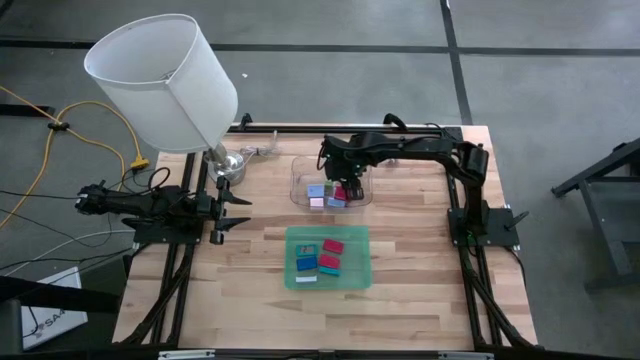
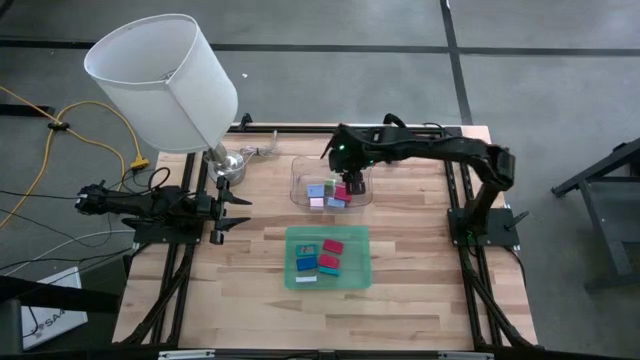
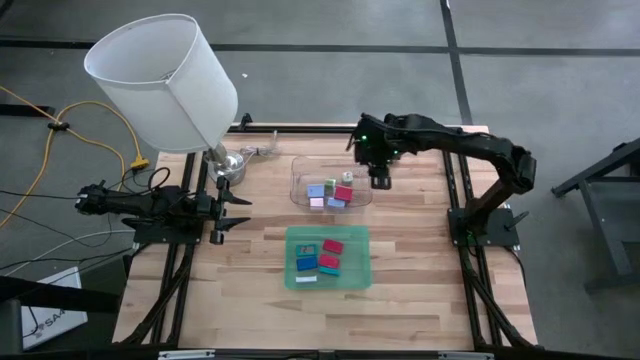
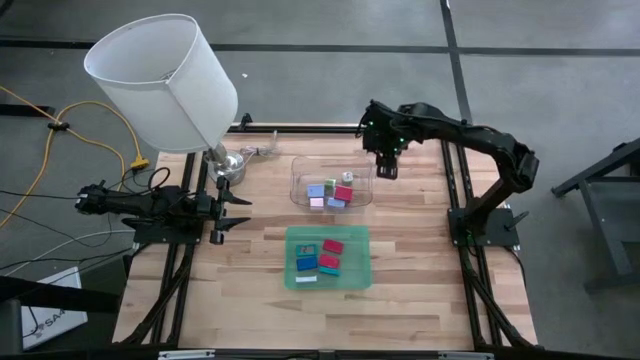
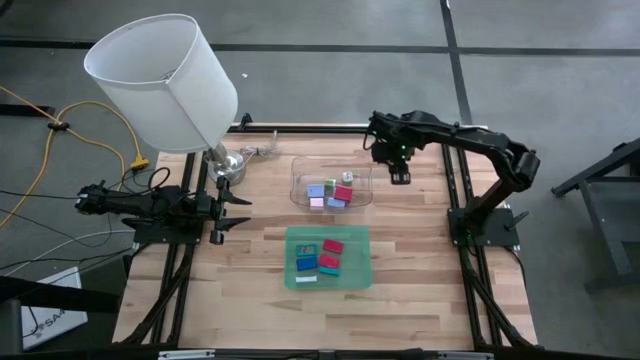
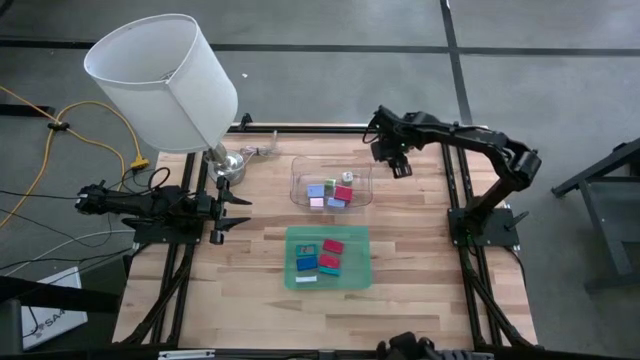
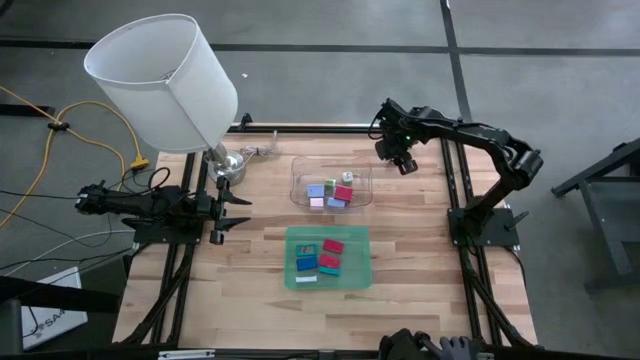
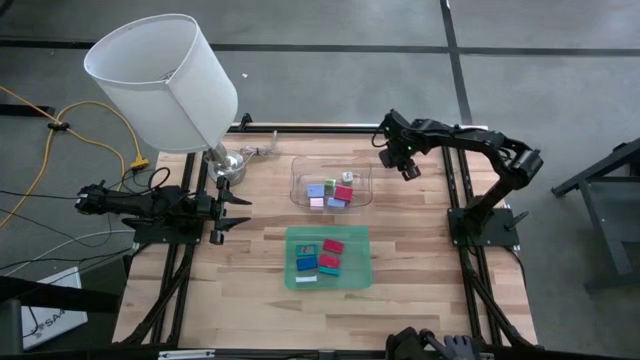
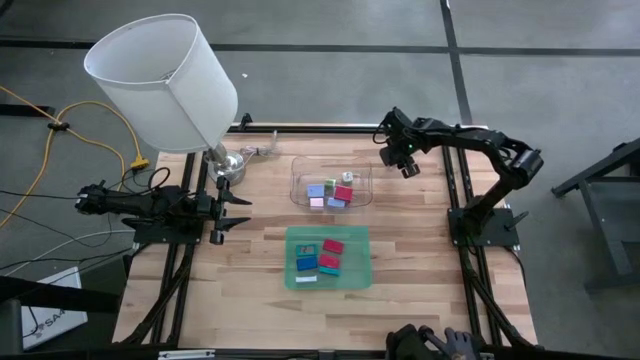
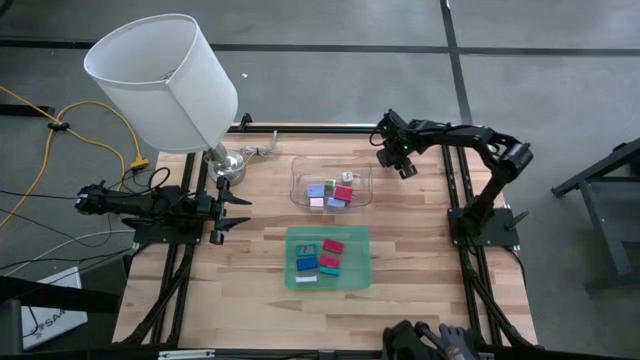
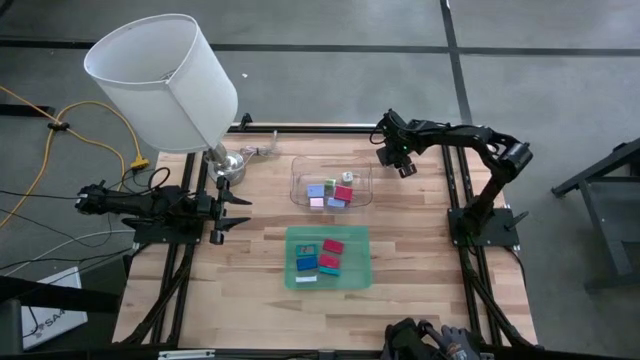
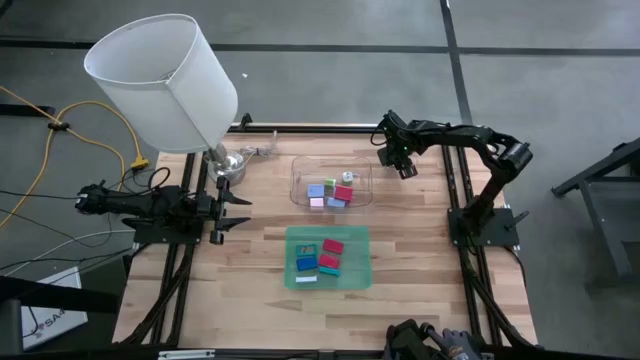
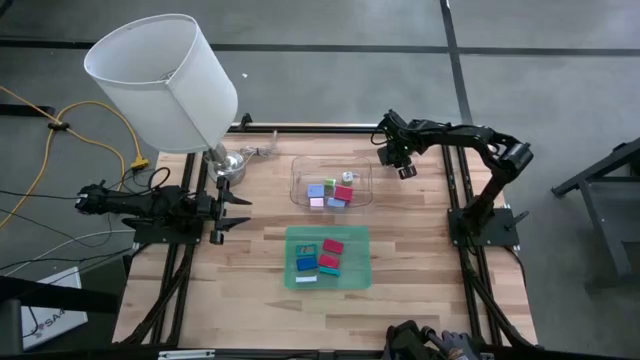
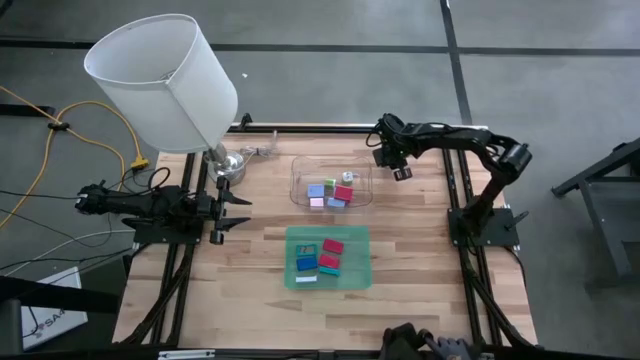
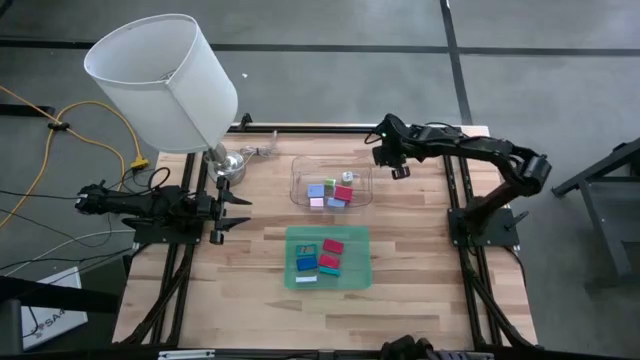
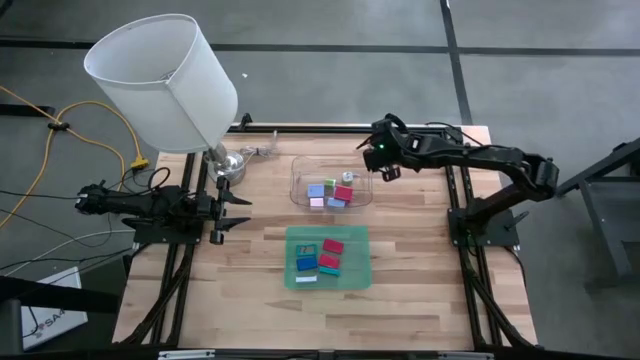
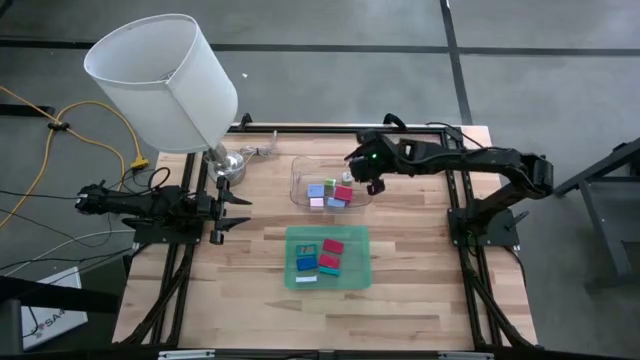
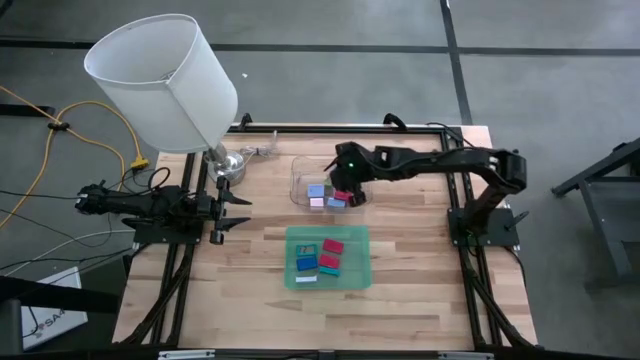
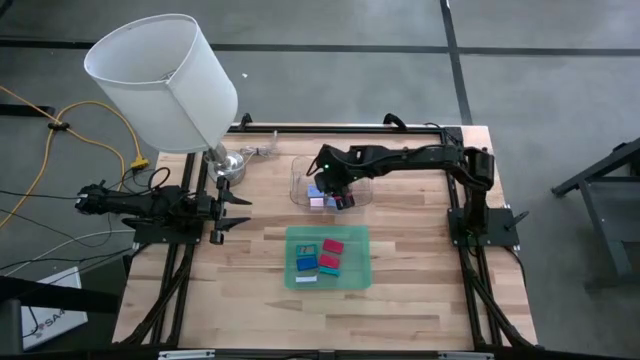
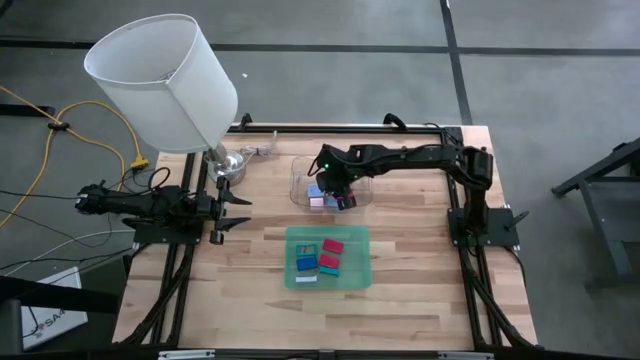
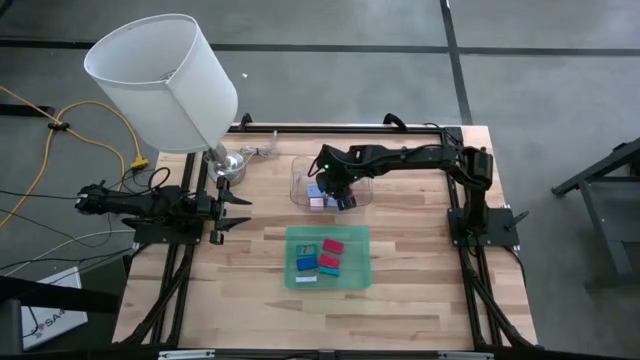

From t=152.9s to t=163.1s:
Task: Pick & Place Office items
Put the violet charger adapter into transparent bin

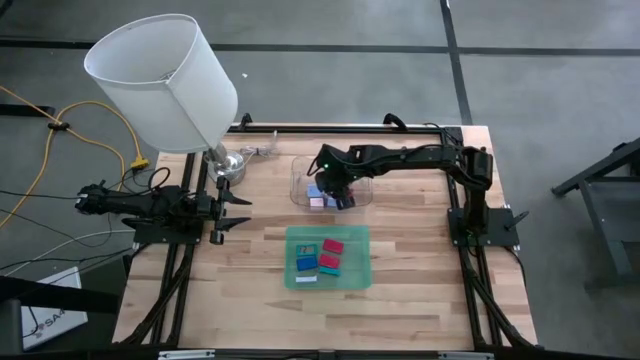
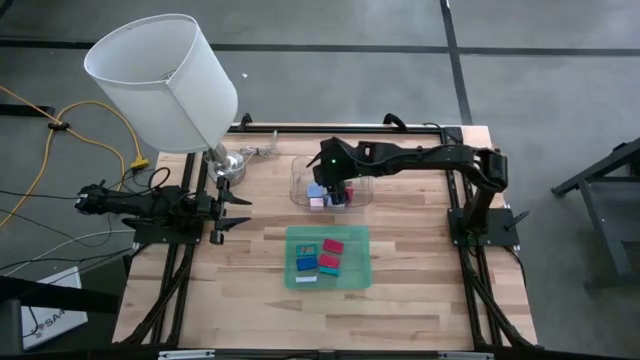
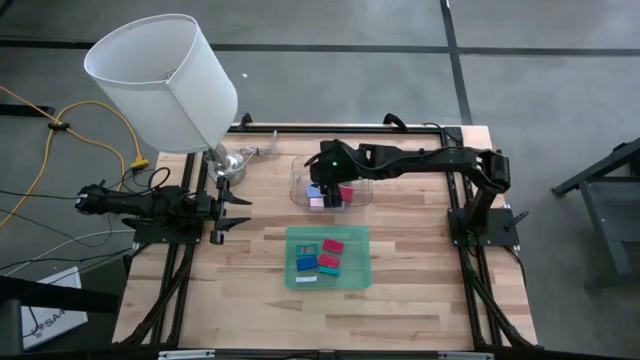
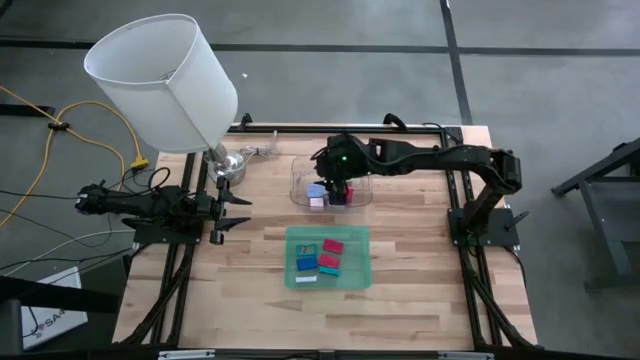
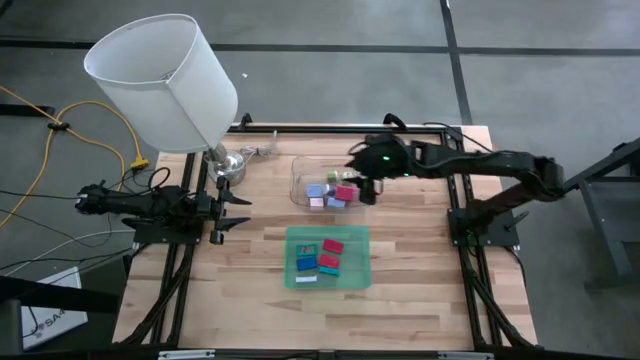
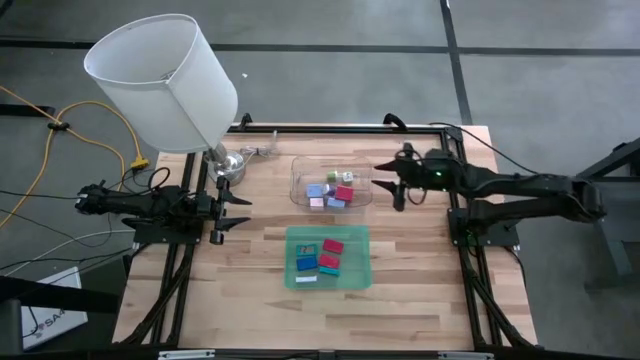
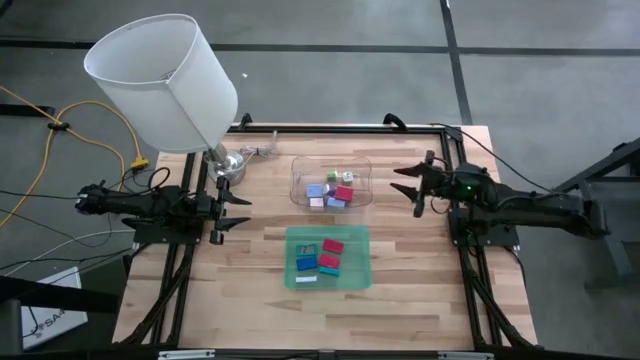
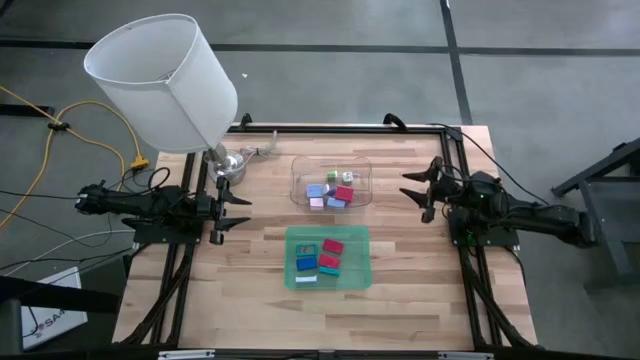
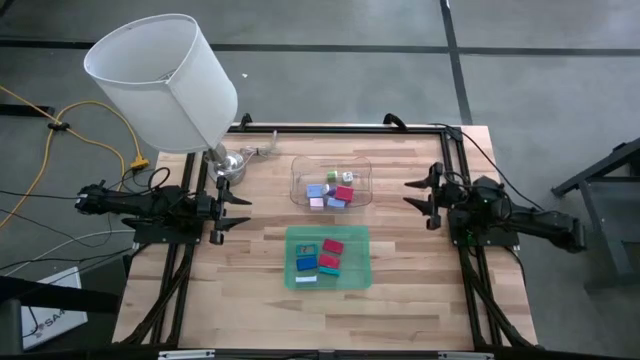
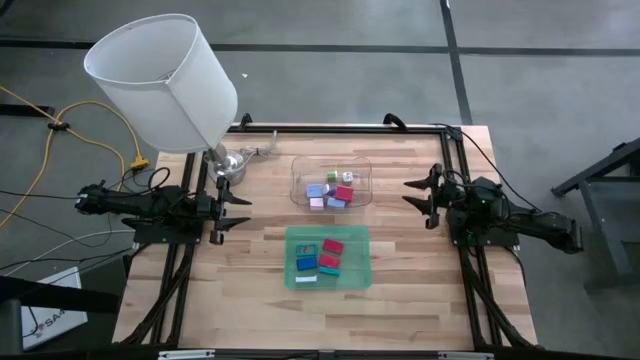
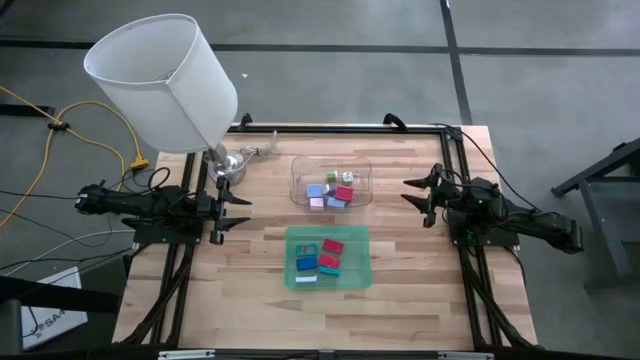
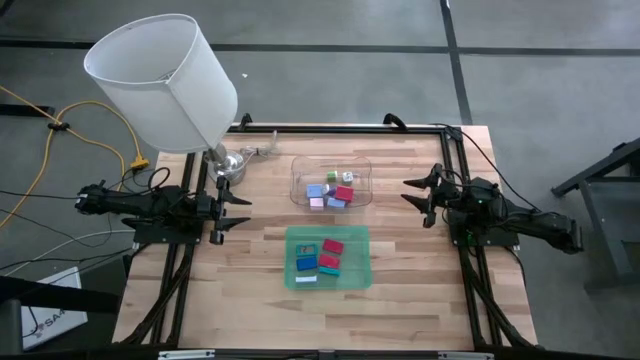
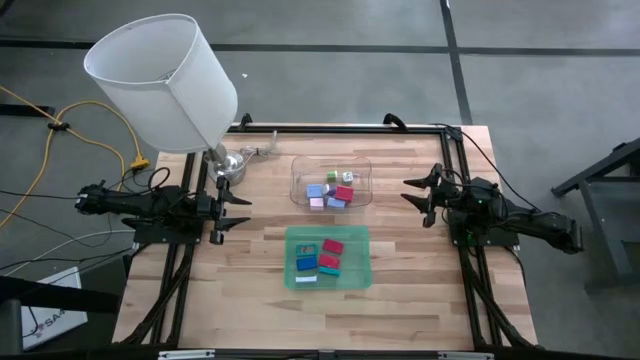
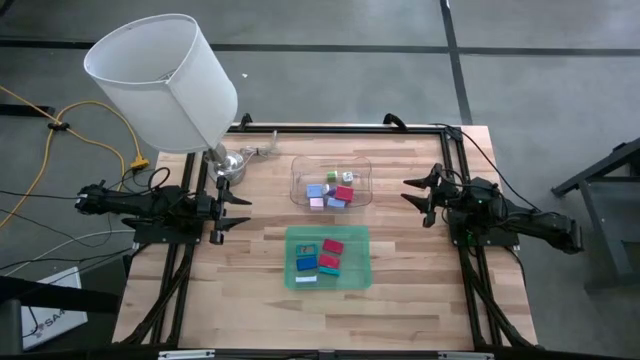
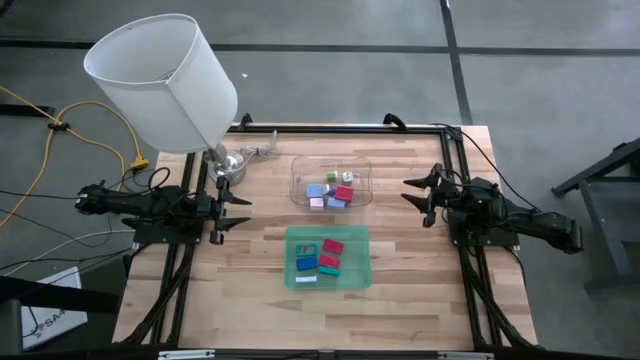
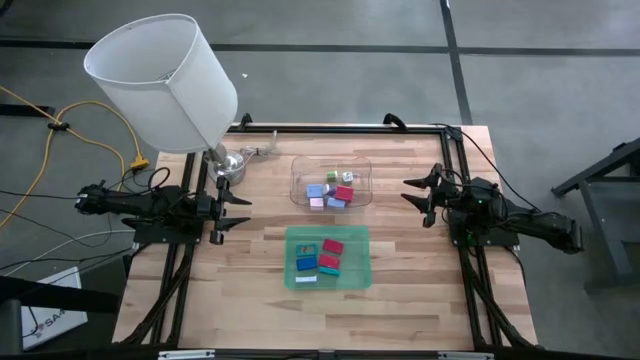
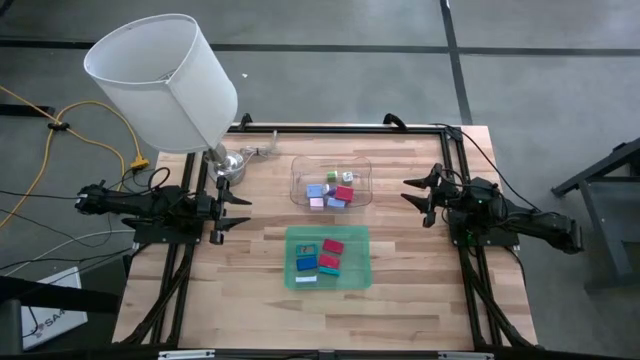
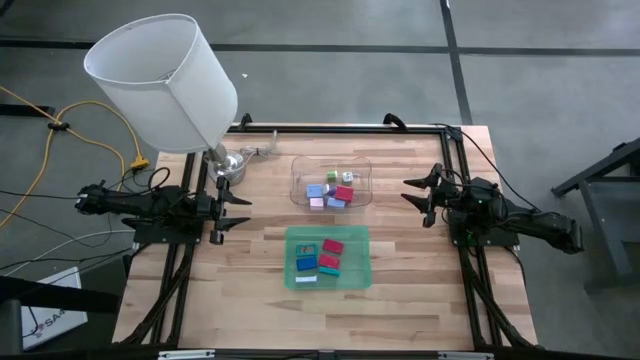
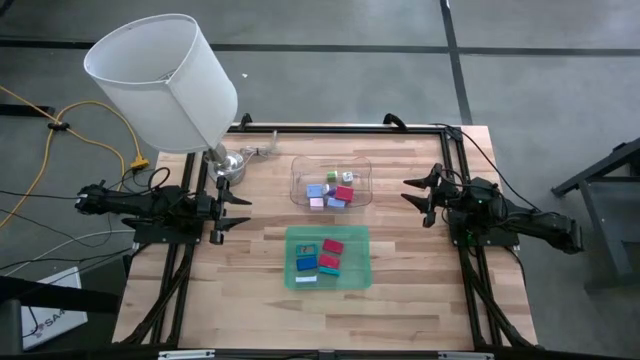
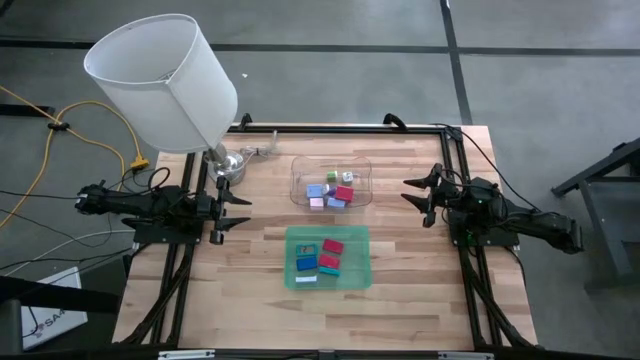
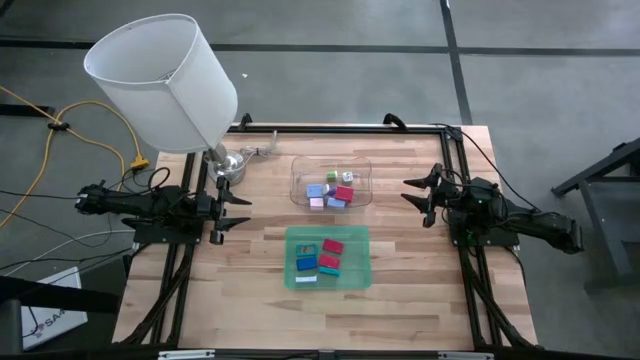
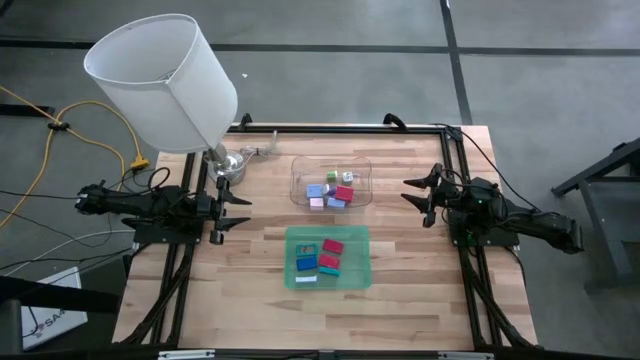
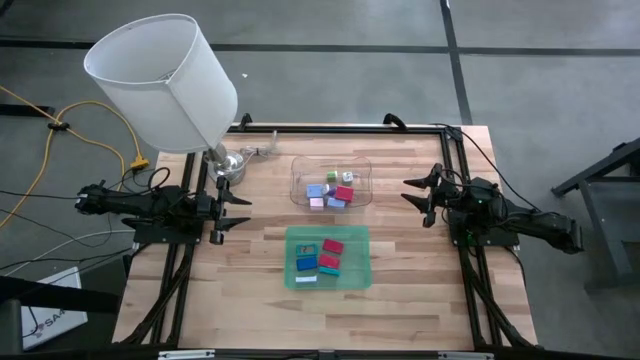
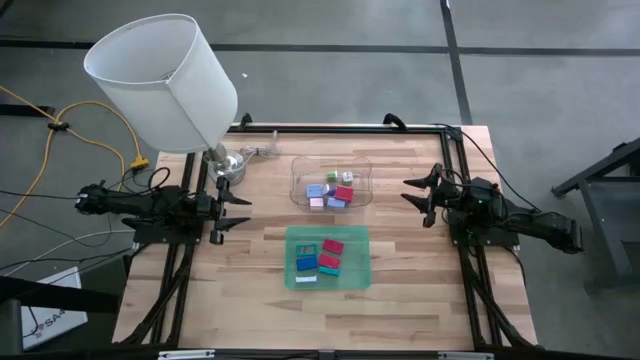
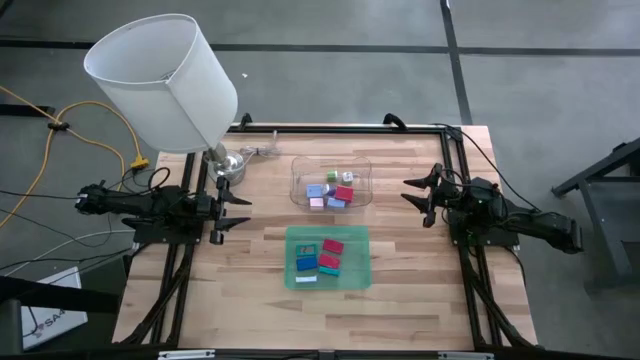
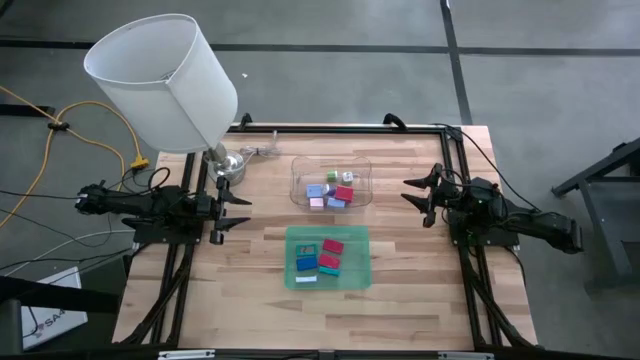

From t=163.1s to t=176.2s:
Return to Home Position
